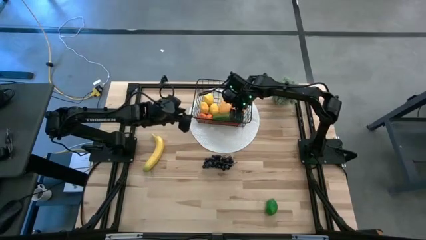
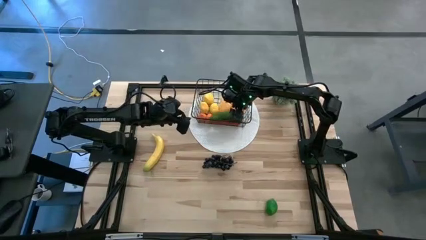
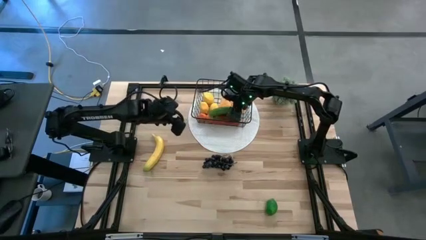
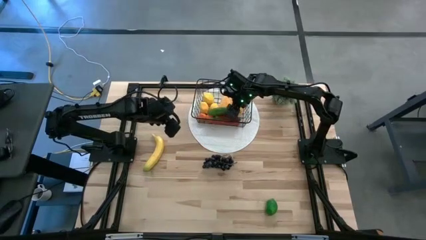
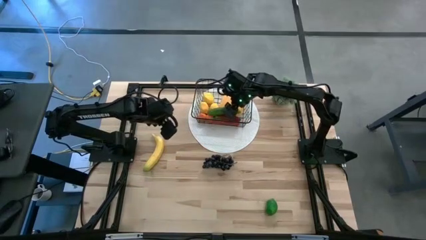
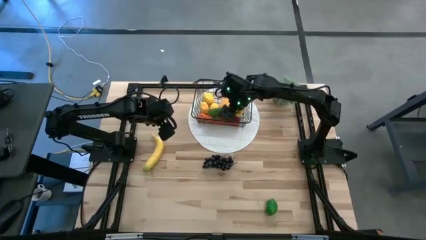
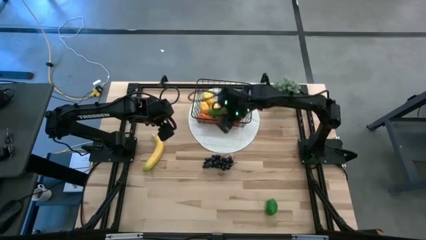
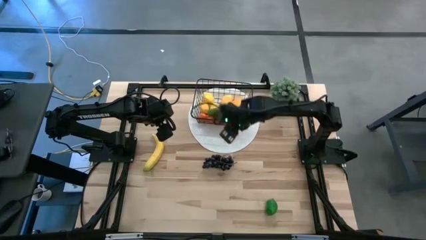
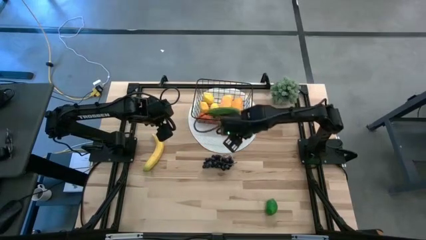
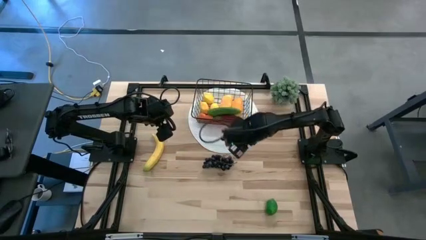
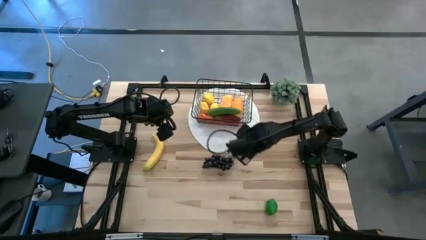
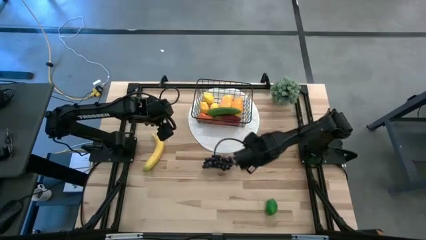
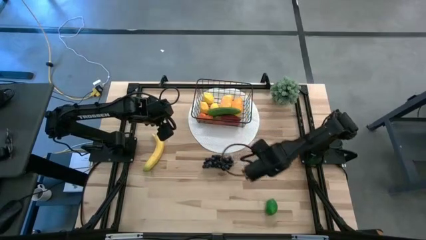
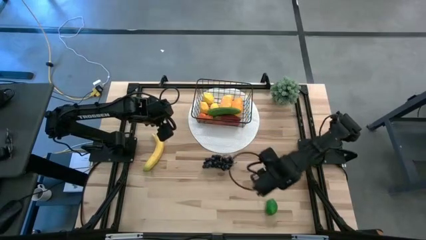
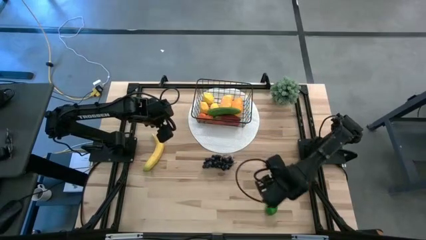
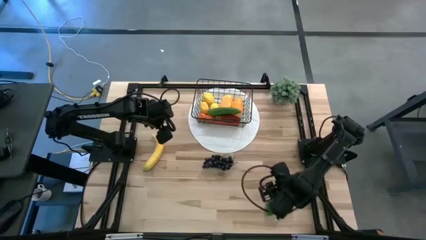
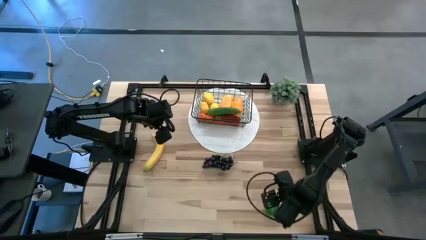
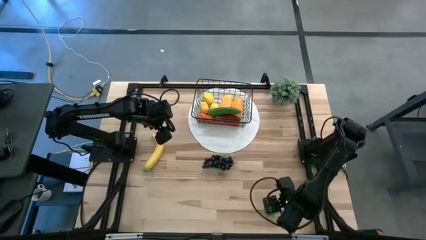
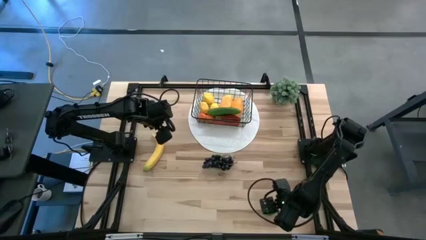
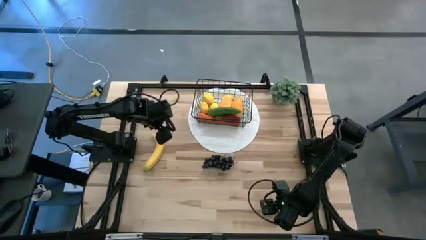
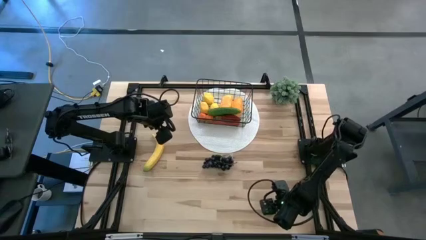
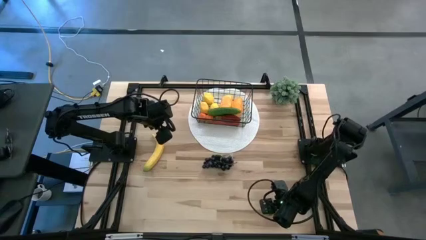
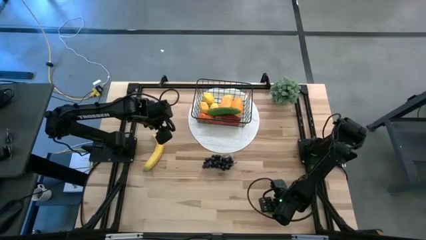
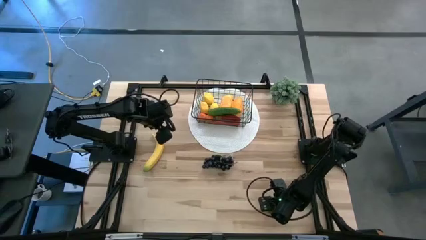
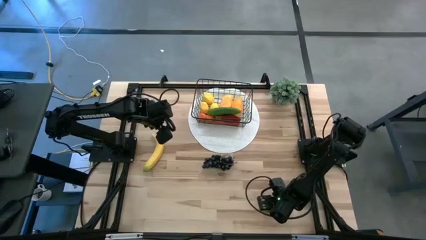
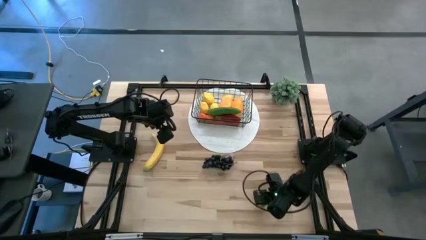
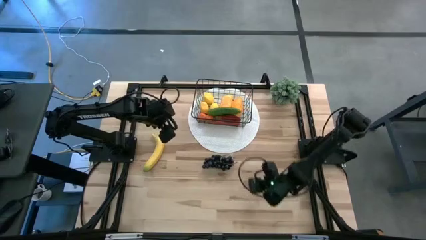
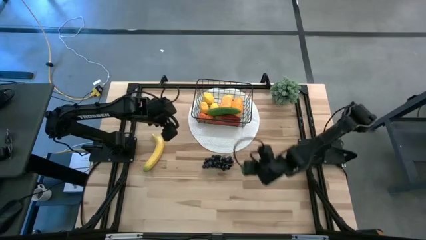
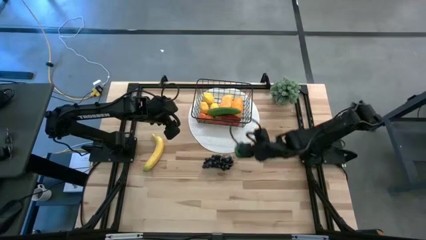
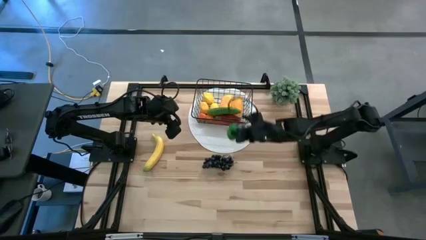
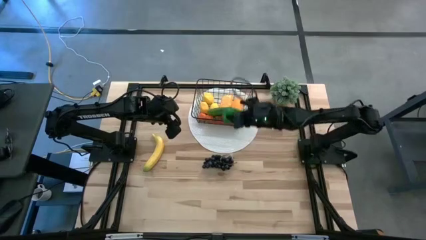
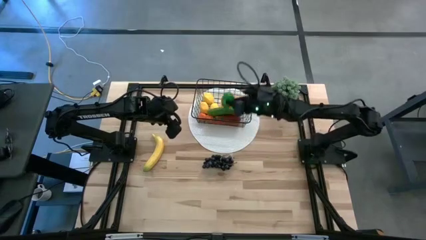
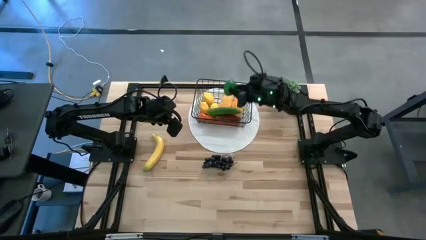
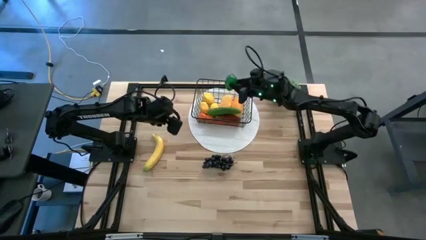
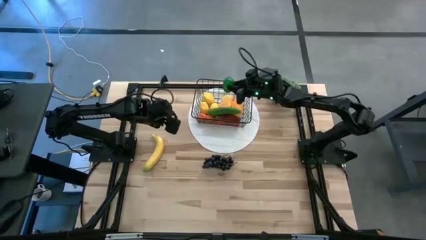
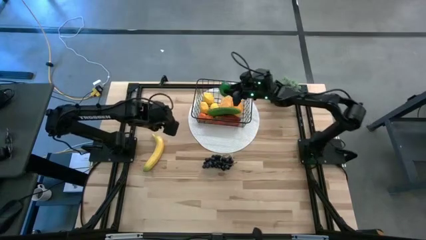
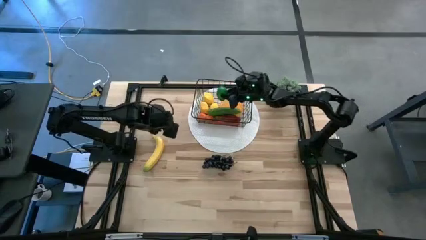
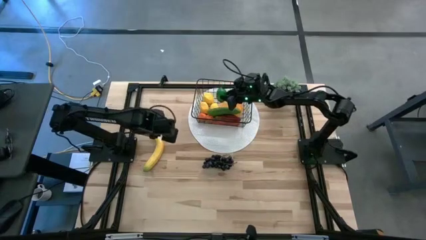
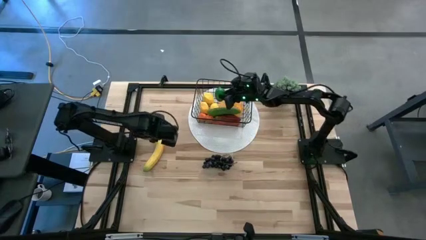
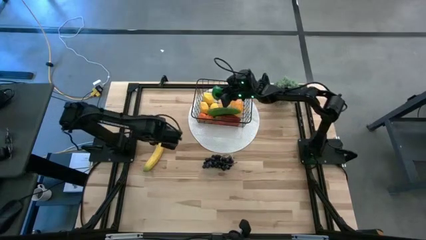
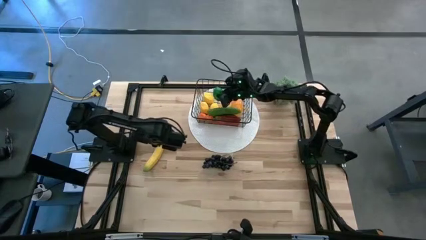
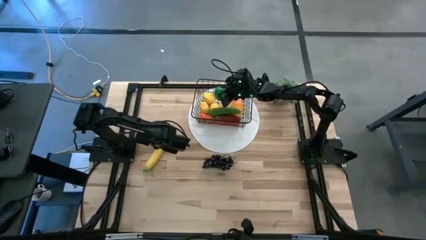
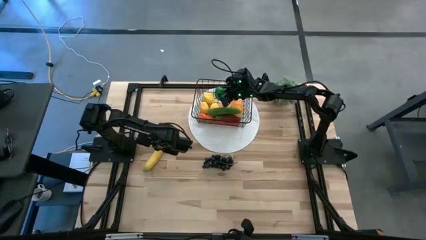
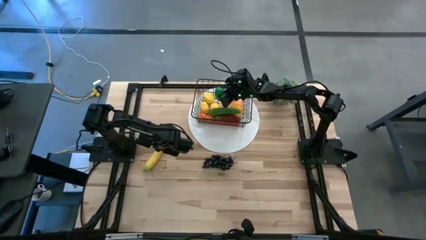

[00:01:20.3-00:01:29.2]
Task: Build produce basket
Put the lime into the mesh basket

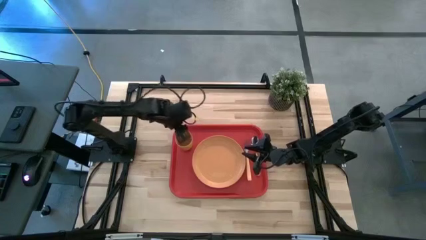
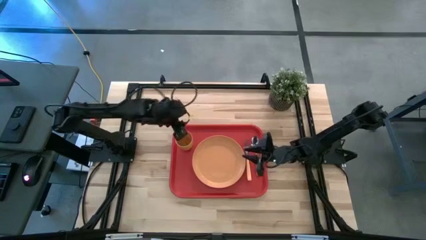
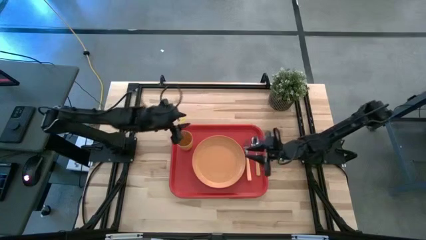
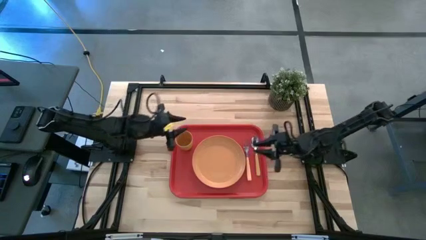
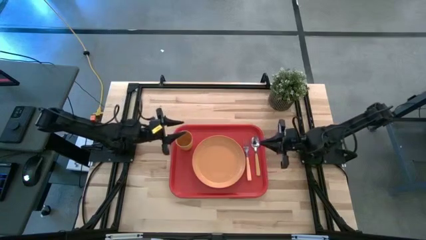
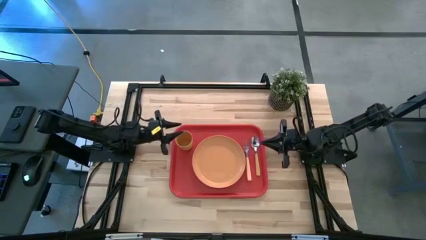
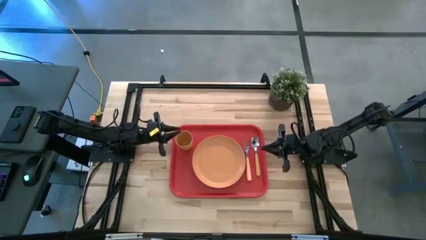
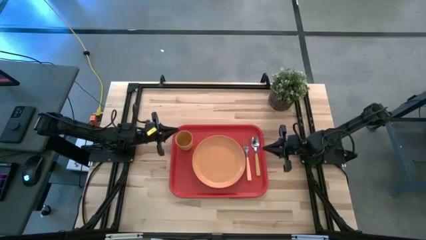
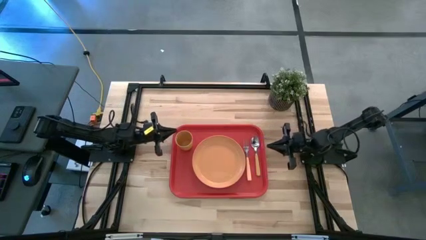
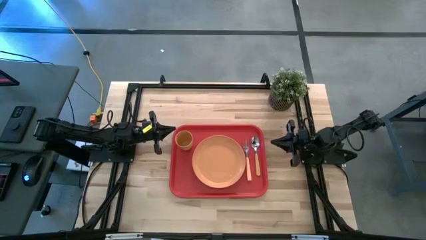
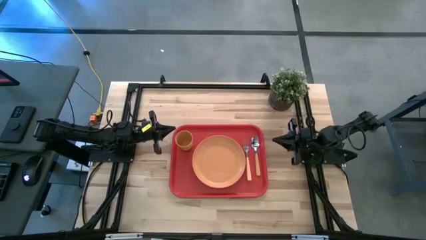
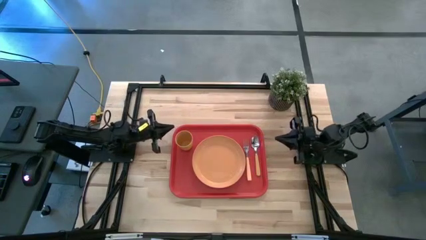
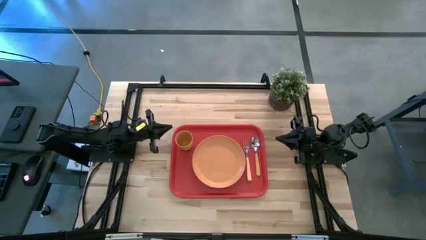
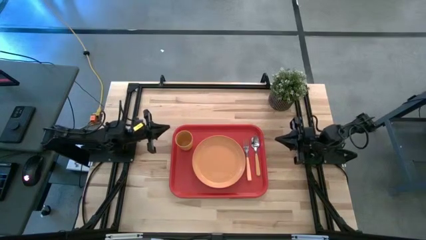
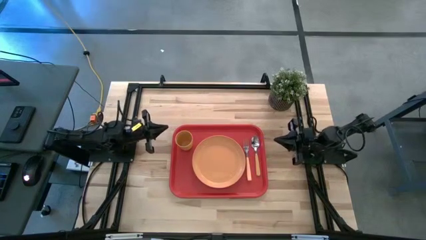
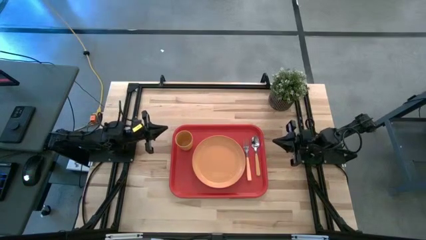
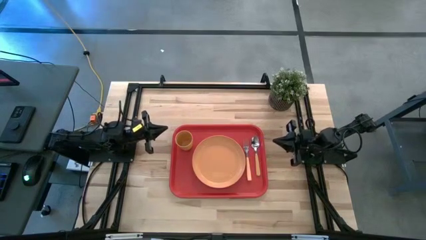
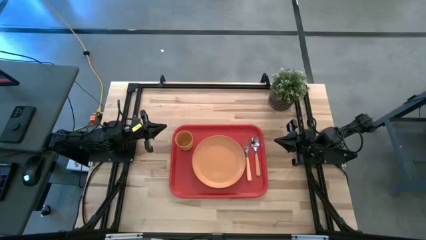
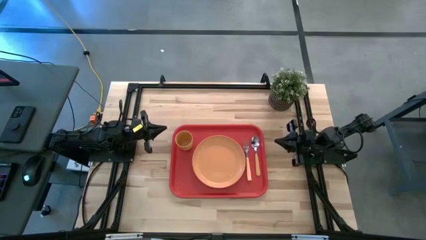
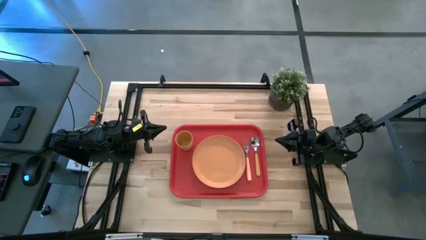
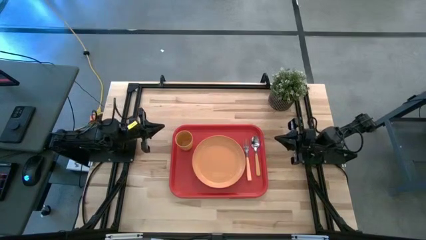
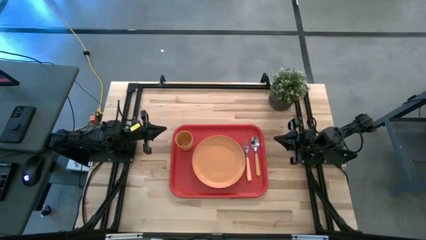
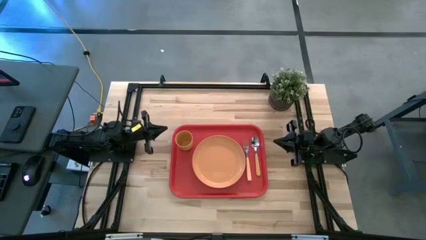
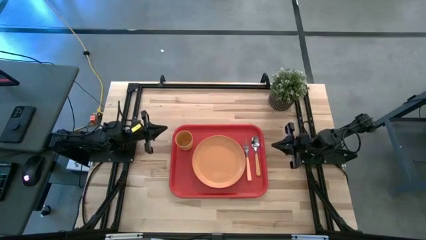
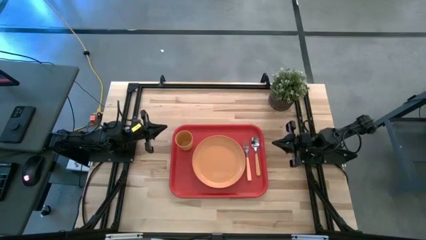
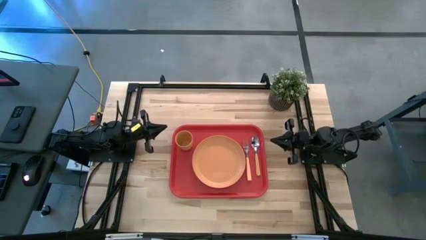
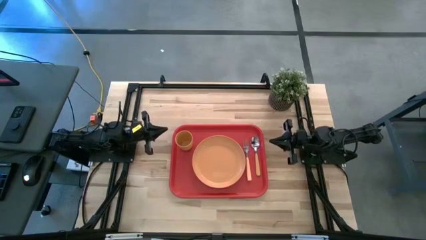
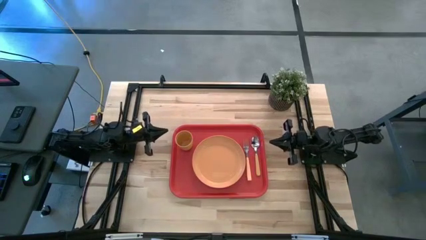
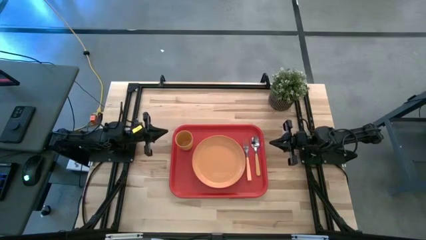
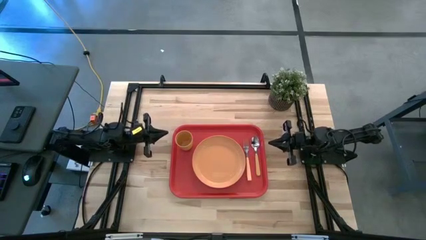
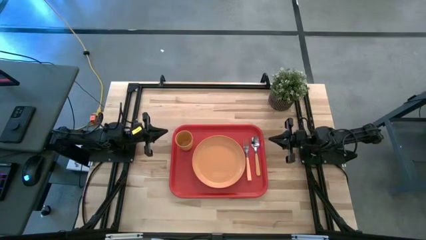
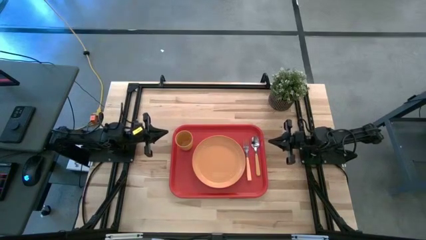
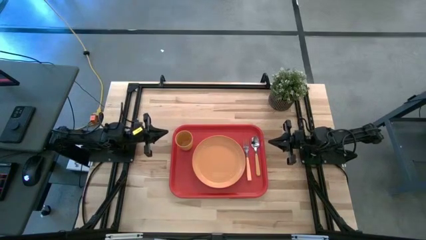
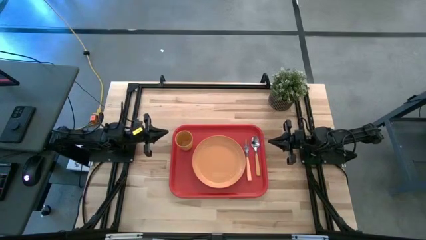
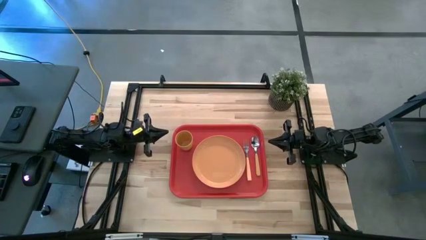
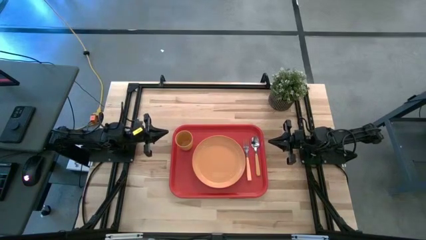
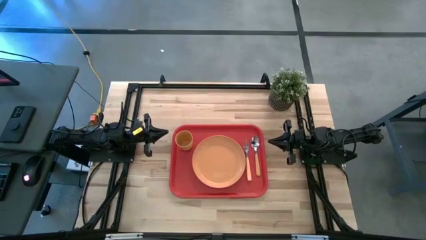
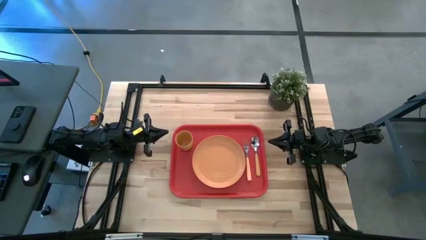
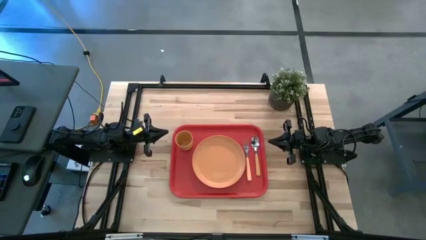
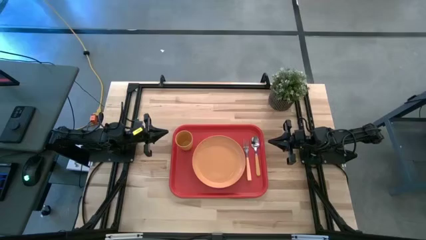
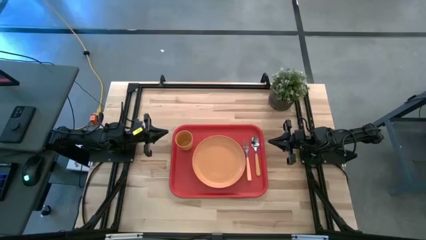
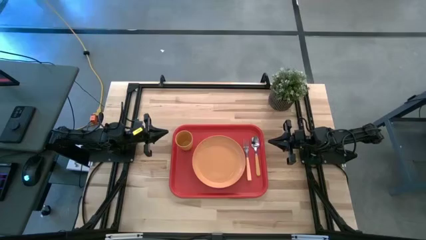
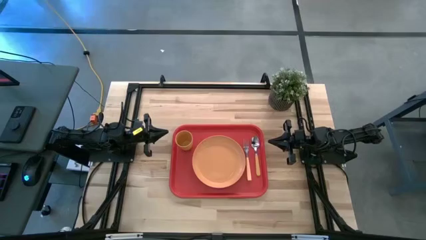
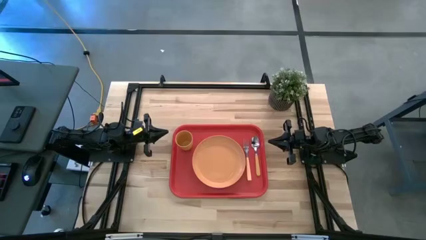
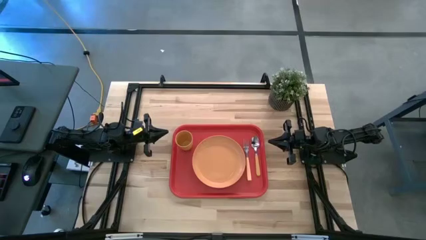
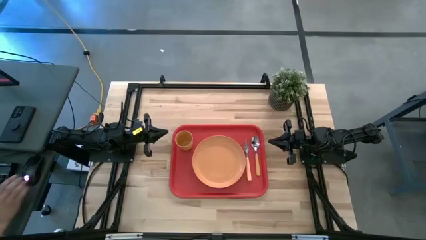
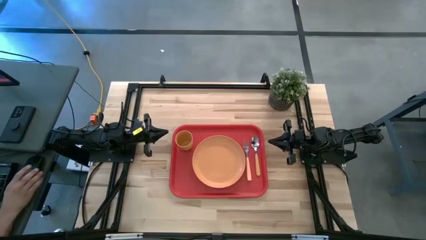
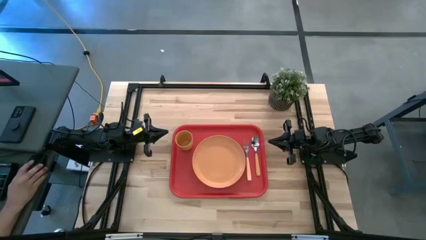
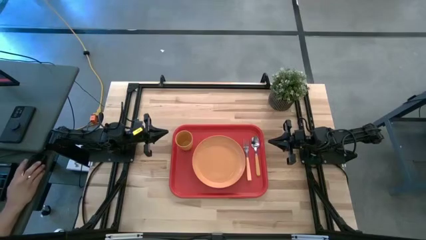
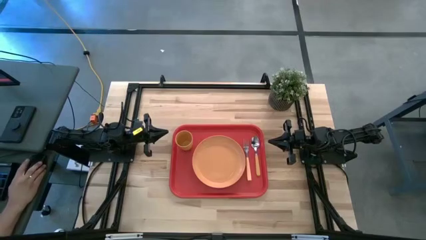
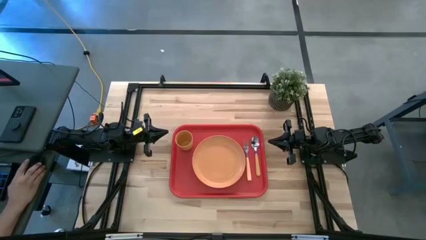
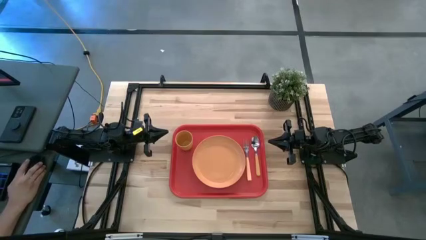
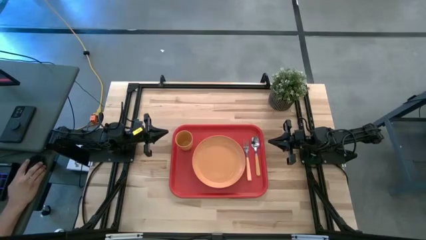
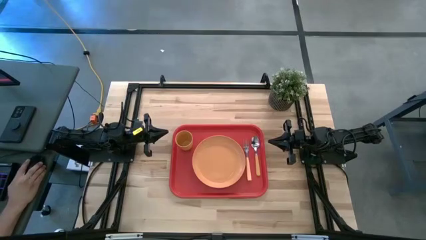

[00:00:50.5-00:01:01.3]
Task: Pick and place plate/cup/fork/spoon on tray
Return to Home Position
